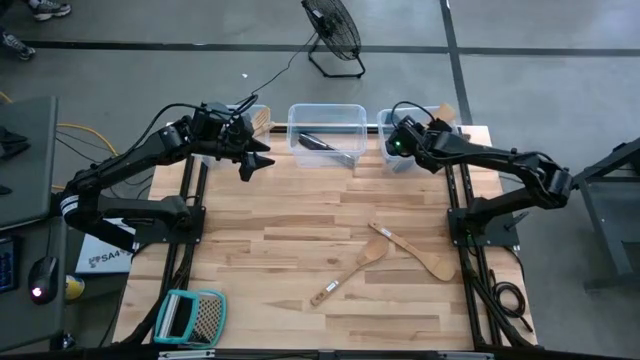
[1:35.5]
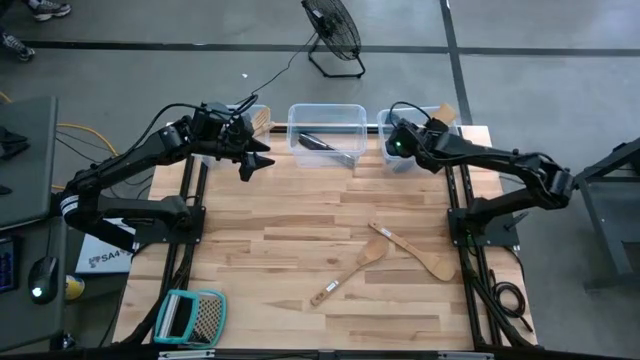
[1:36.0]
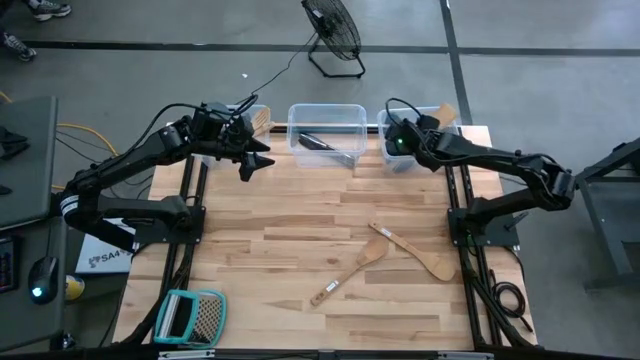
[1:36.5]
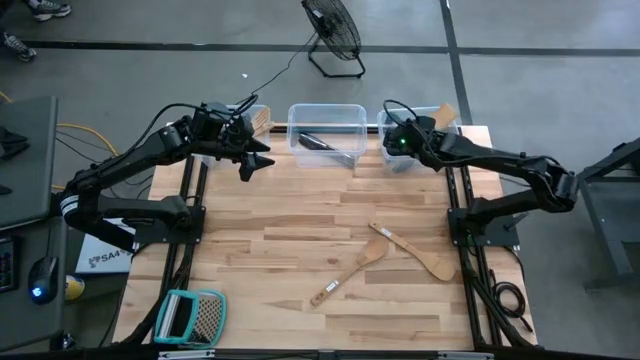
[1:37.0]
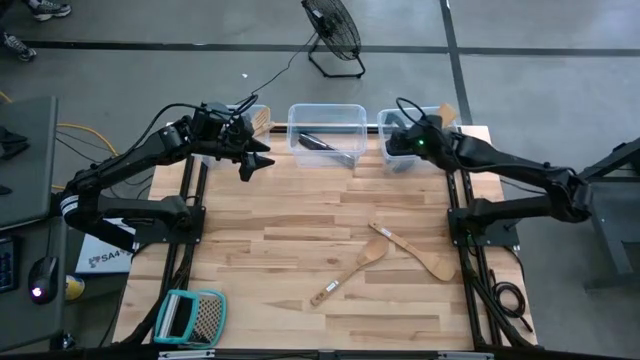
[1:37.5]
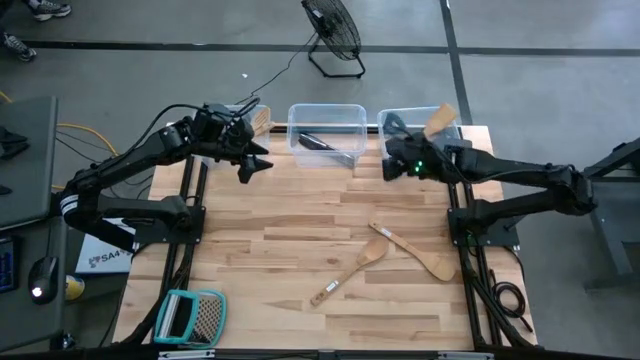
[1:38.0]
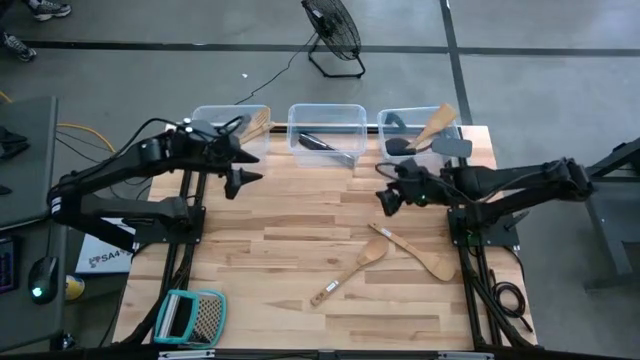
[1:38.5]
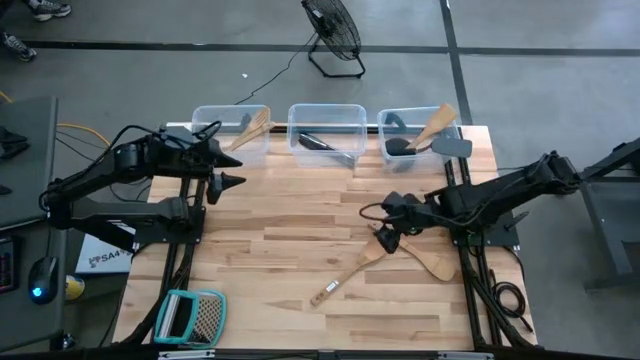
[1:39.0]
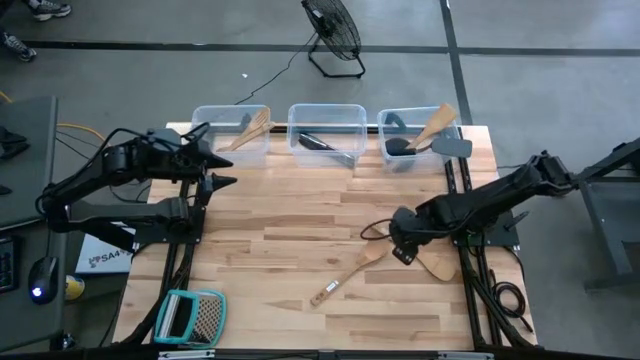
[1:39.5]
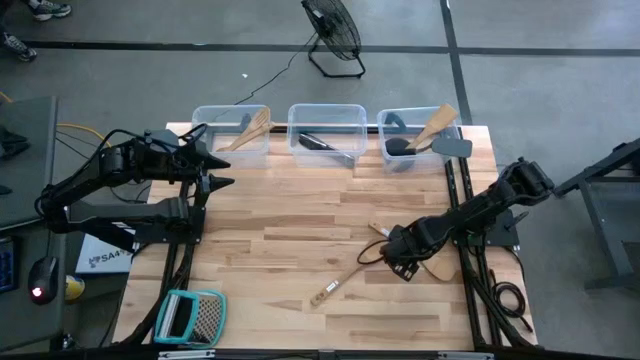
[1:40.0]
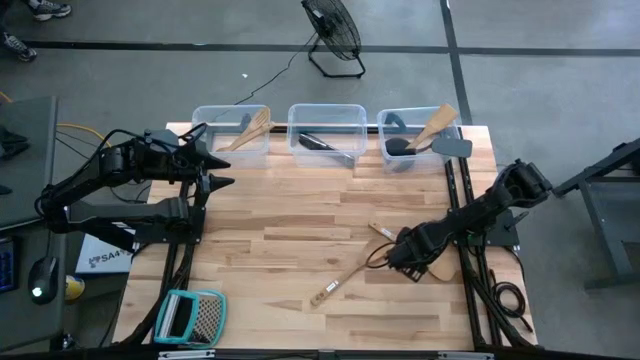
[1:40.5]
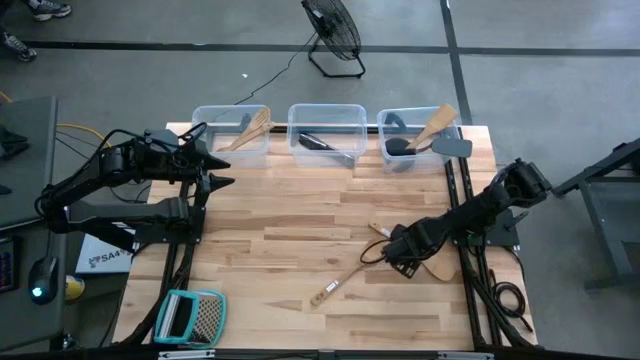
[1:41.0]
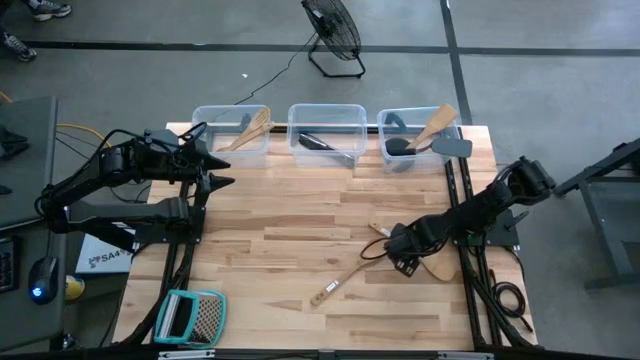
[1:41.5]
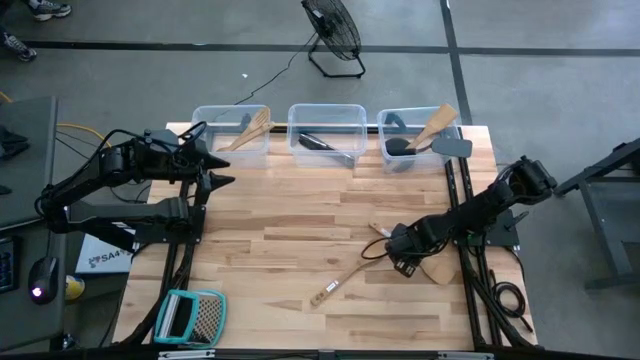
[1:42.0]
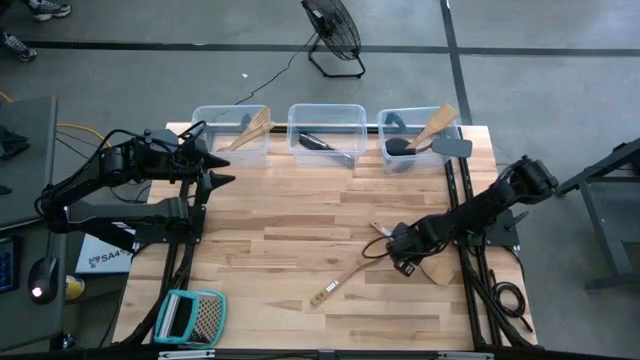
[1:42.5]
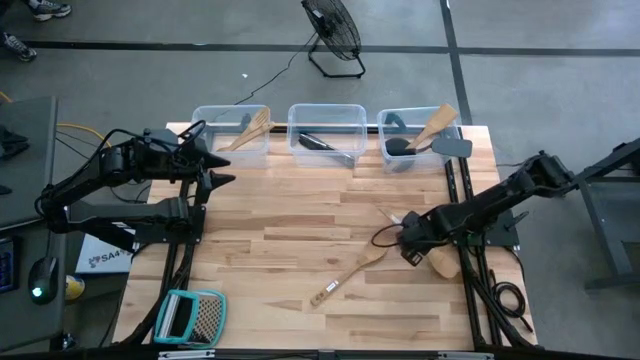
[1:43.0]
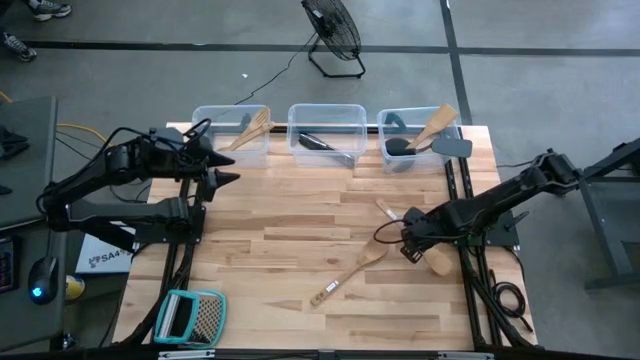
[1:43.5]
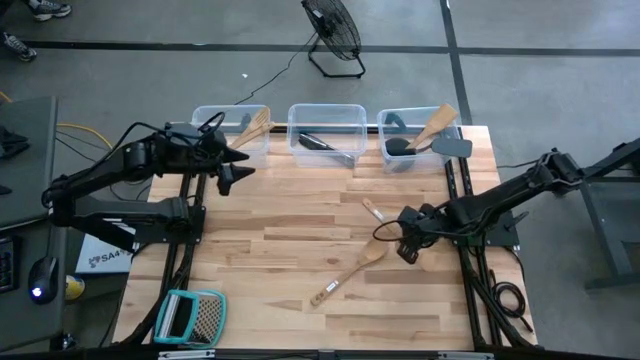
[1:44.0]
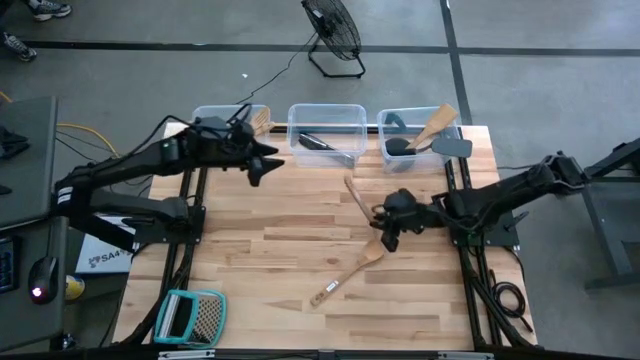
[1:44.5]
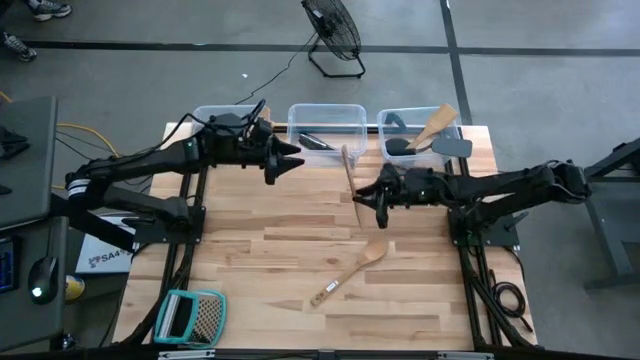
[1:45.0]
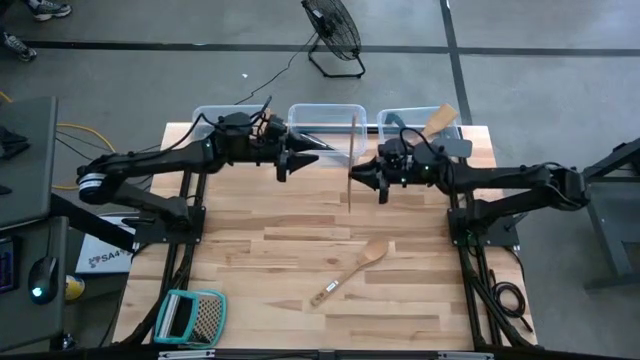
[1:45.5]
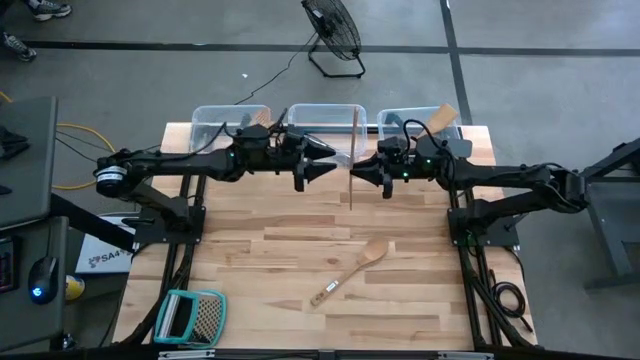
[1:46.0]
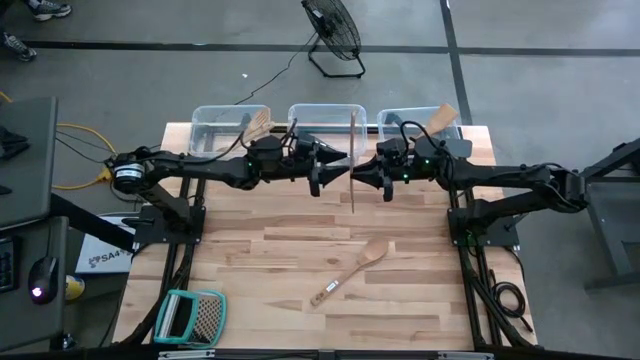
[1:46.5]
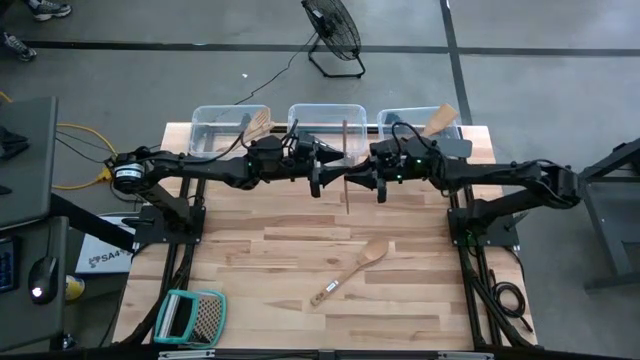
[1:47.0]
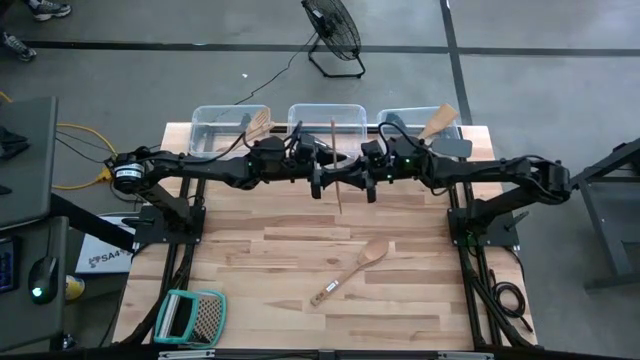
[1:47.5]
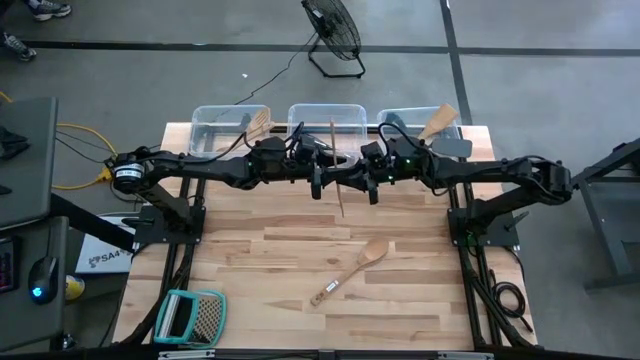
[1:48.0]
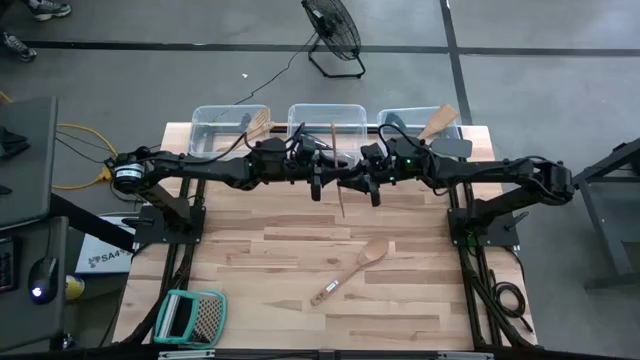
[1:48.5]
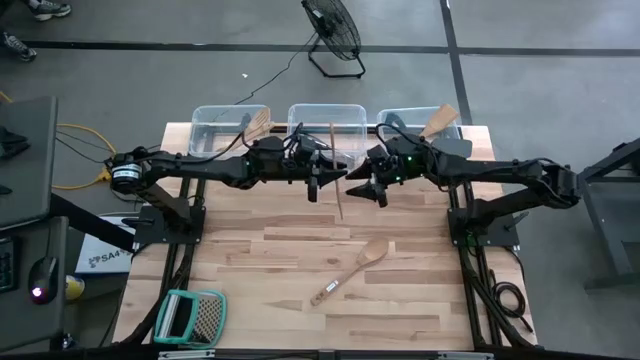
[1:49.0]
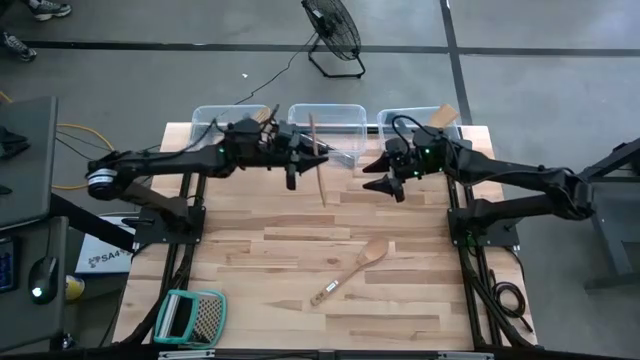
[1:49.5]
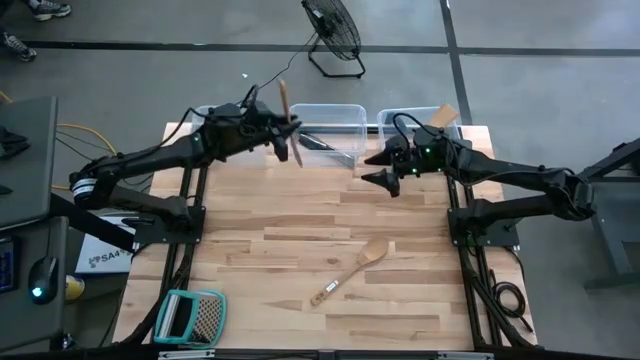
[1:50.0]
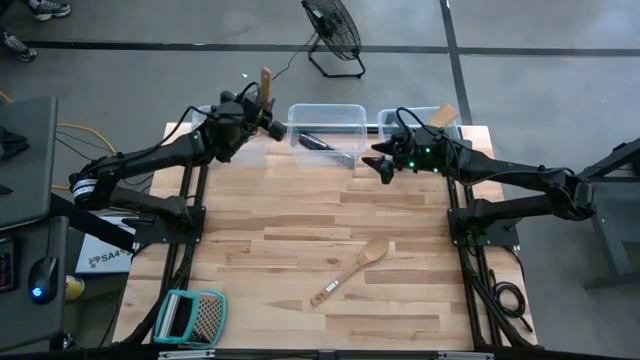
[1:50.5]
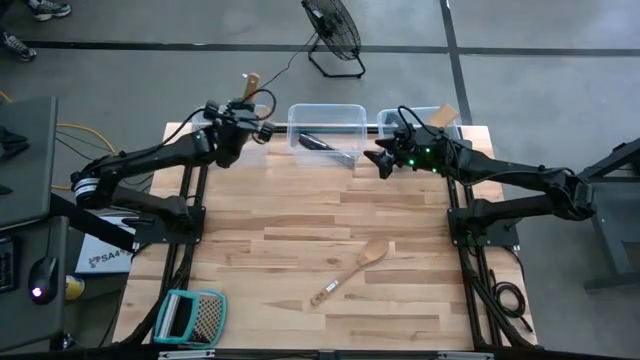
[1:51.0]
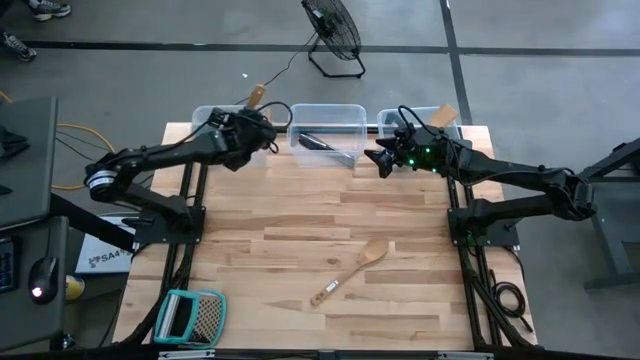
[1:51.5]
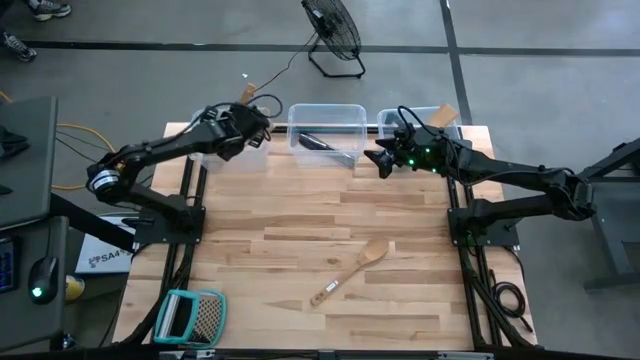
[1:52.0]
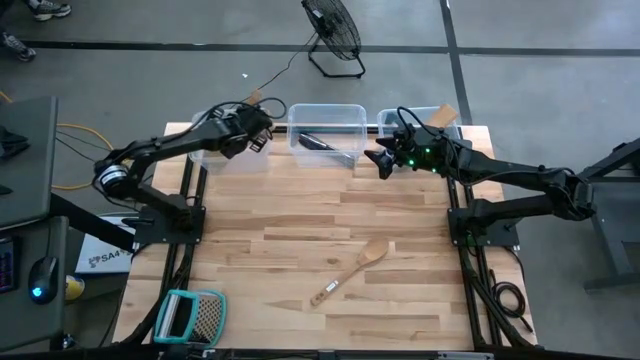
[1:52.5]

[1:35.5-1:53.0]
Task: Pick & Place Kitchen Items
Put the brown wooden spoon into the left transparent bin

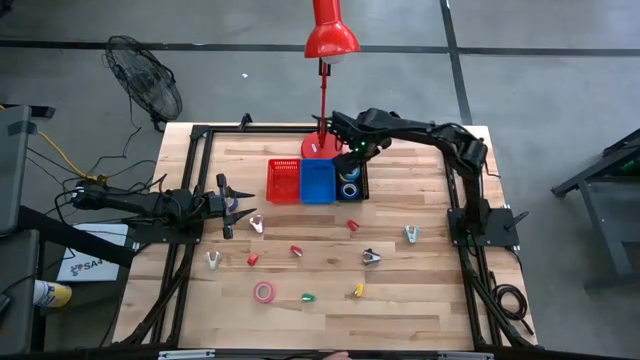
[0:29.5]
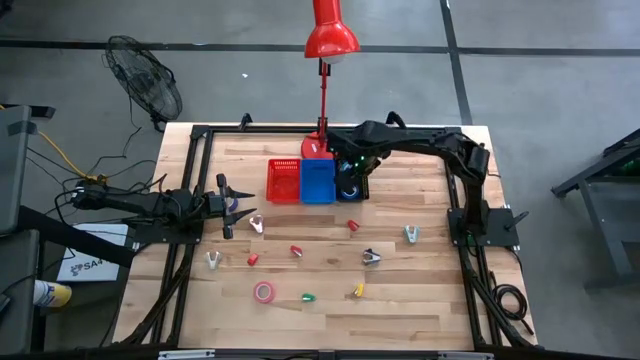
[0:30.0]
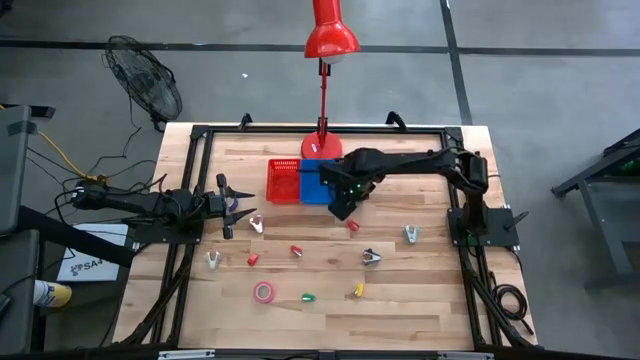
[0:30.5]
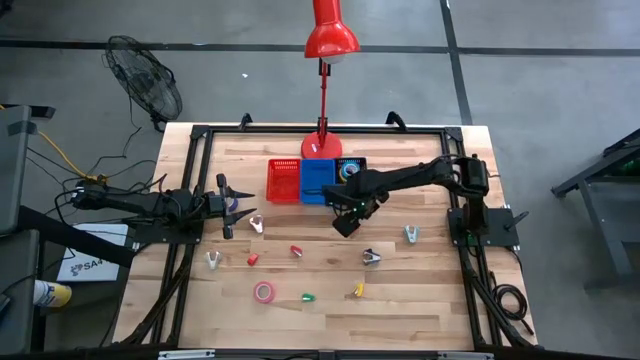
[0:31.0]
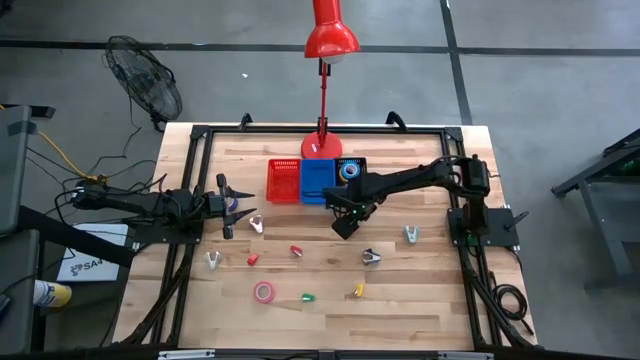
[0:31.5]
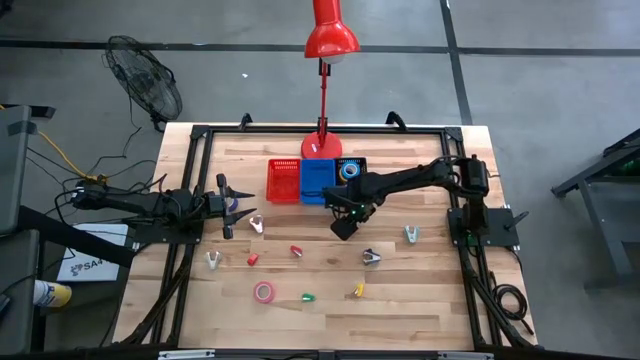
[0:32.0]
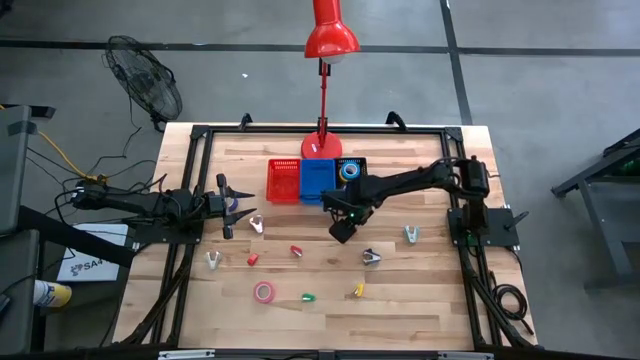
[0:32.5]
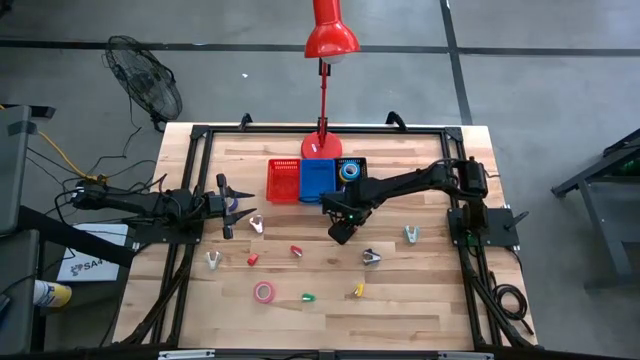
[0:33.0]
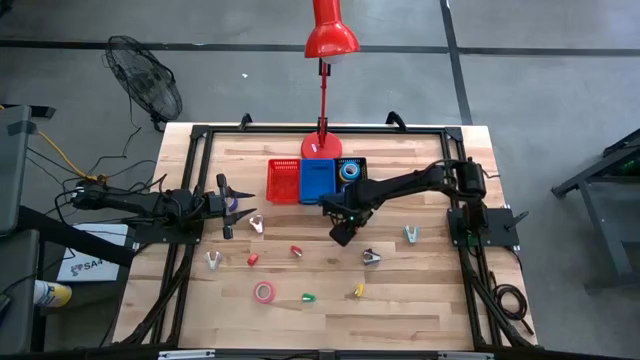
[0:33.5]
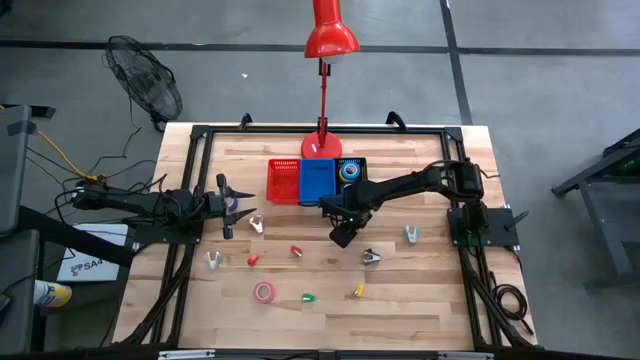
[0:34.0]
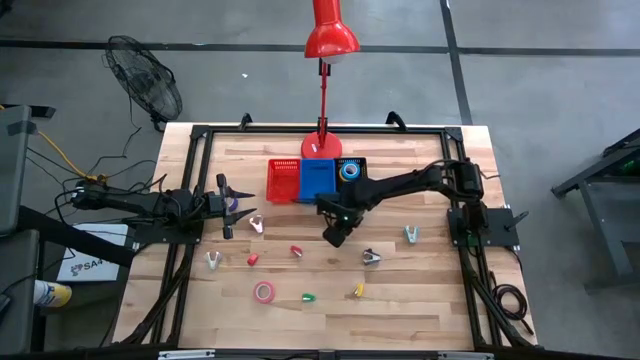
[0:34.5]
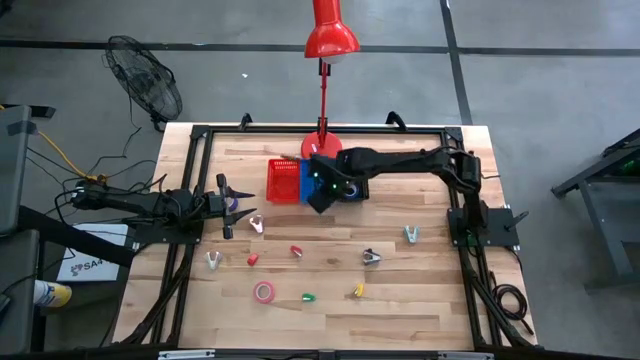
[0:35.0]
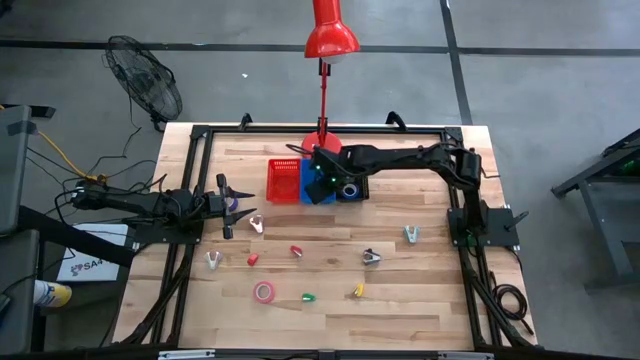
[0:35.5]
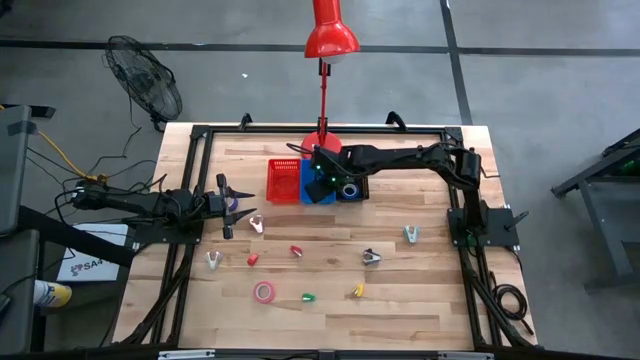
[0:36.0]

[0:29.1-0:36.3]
Task: Pick and place Stapler, Stapler remover, tape
Put the right red stapler into the blue basket
